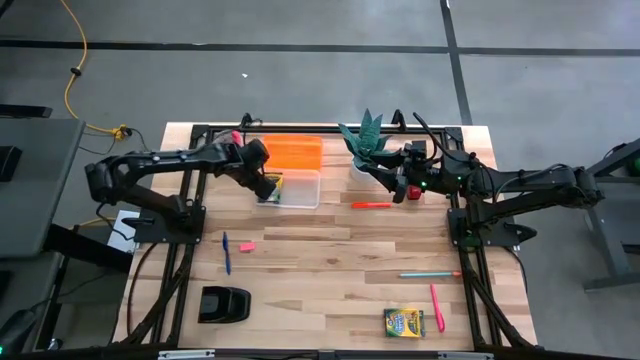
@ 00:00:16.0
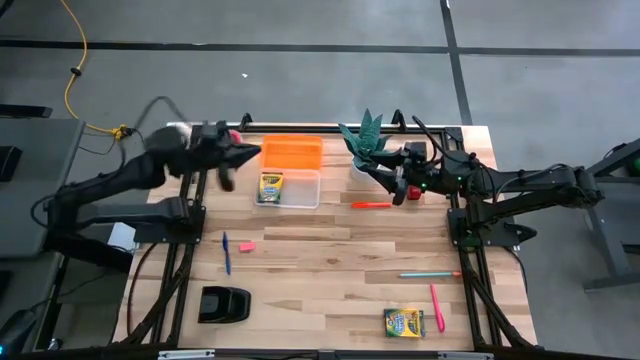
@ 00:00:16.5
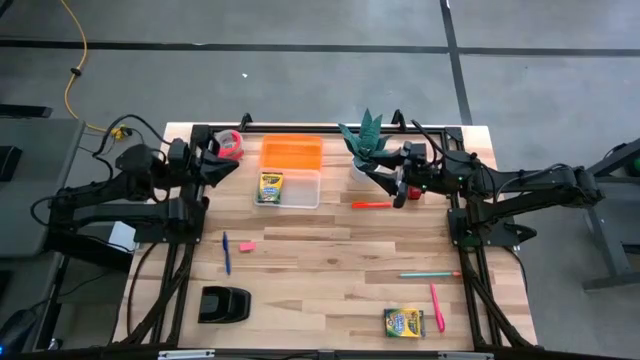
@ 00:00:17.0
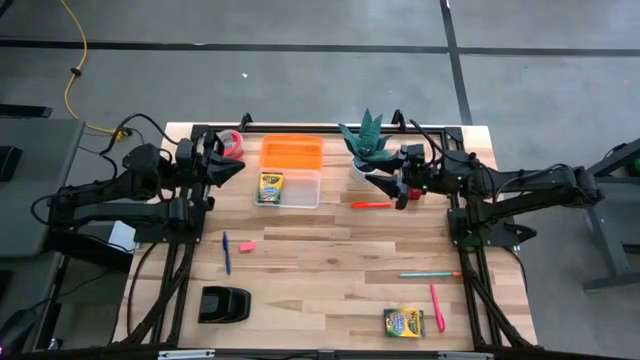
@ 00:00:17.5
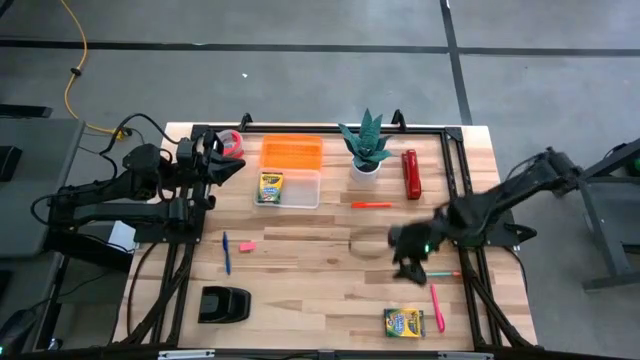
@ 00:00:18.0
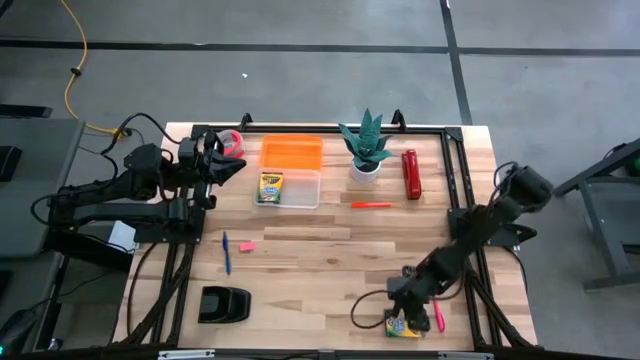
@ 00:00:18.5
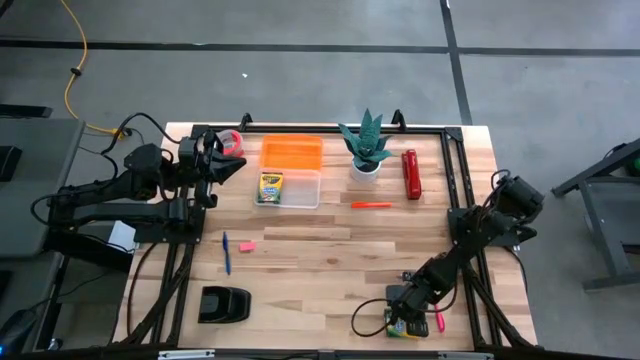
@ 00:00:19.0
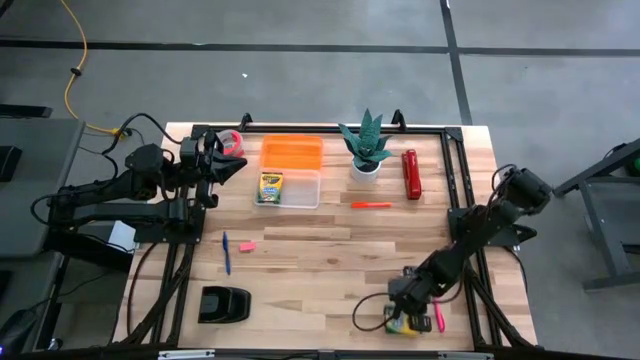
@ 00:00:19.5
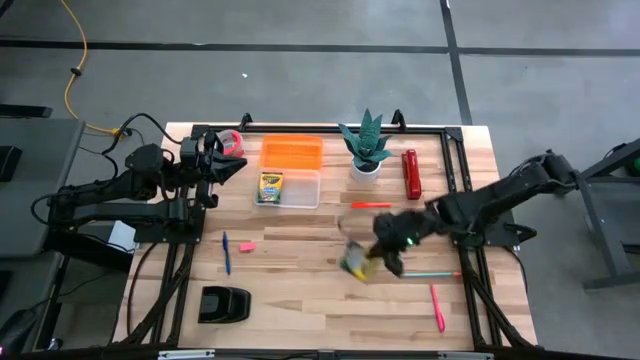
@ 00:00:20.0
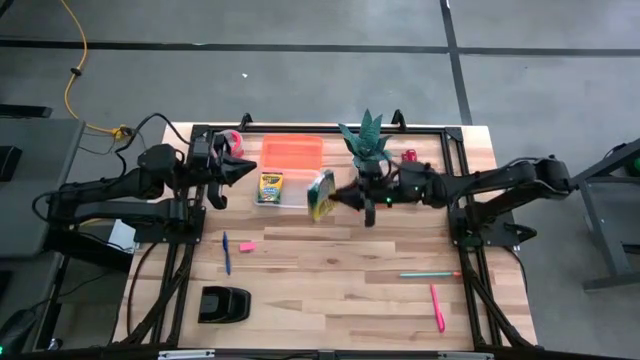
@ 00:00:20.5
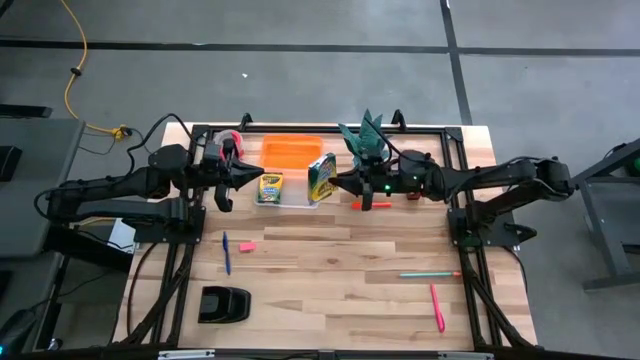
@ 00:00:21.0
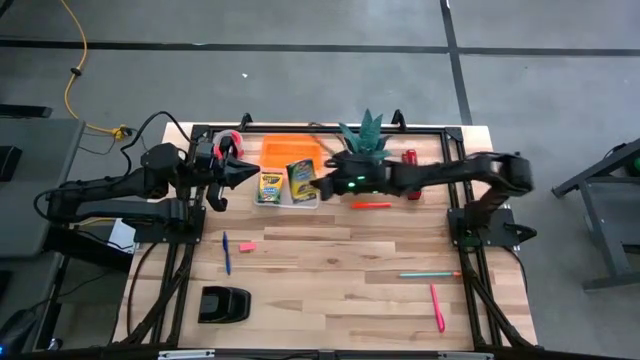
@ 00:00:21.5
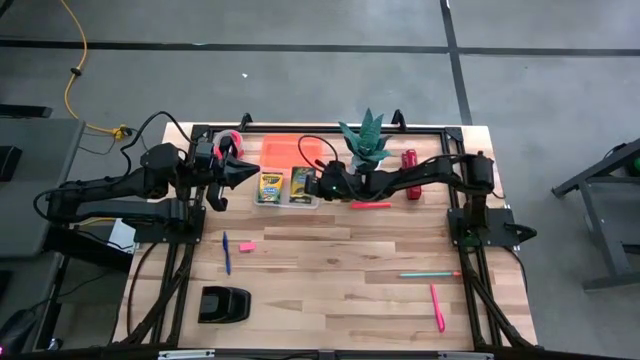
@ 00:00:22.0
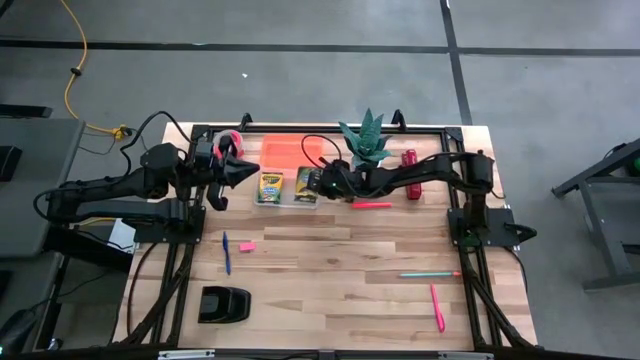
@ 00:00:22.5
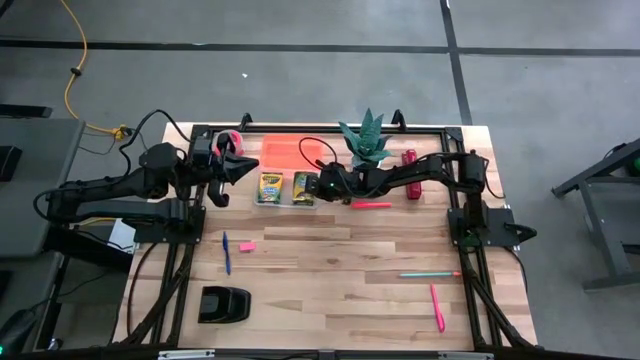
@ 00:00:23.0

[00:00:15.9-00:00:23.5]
Task: Pack school essentials
Put the yellow crayon box into the orange supply box

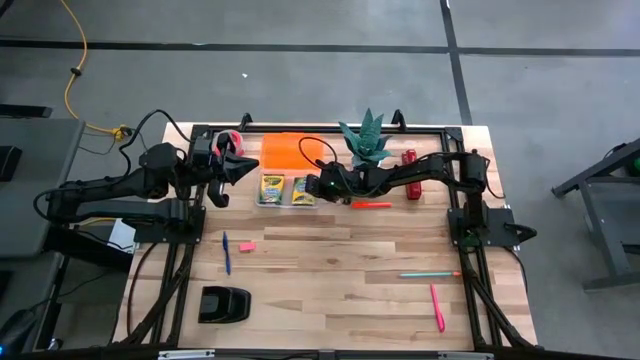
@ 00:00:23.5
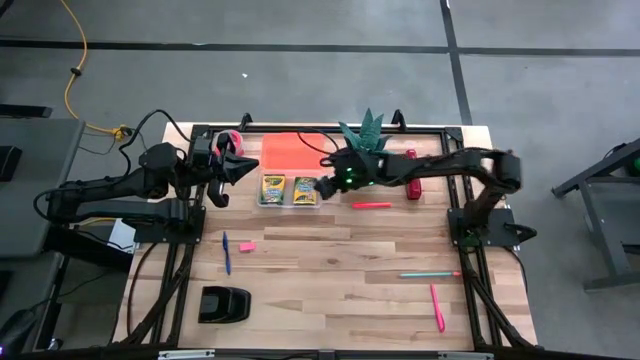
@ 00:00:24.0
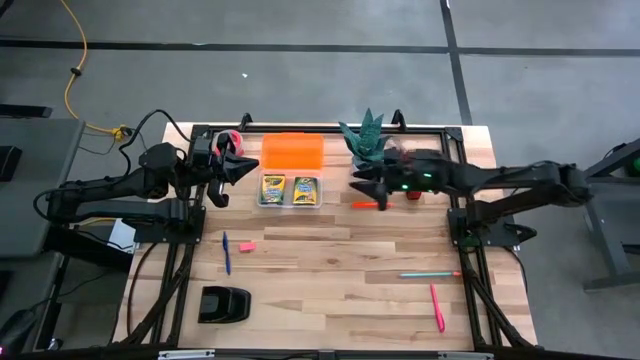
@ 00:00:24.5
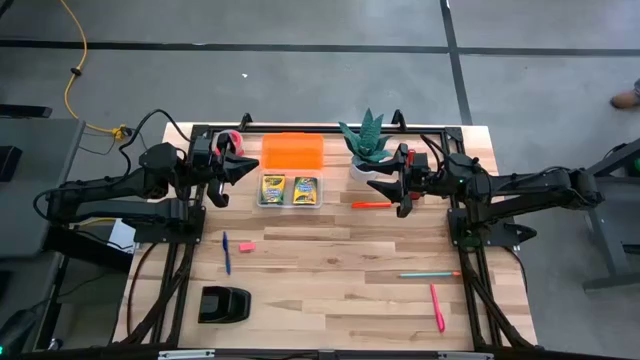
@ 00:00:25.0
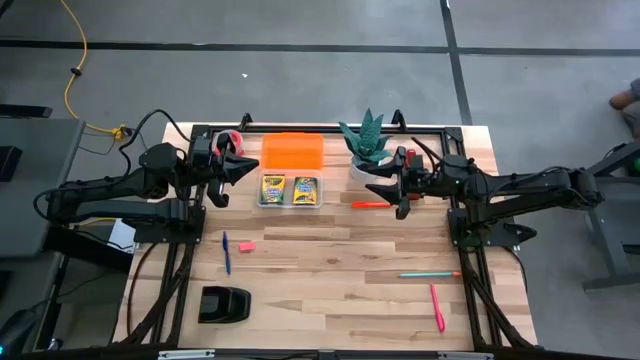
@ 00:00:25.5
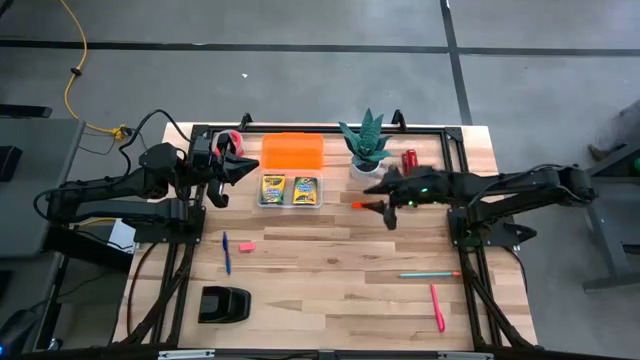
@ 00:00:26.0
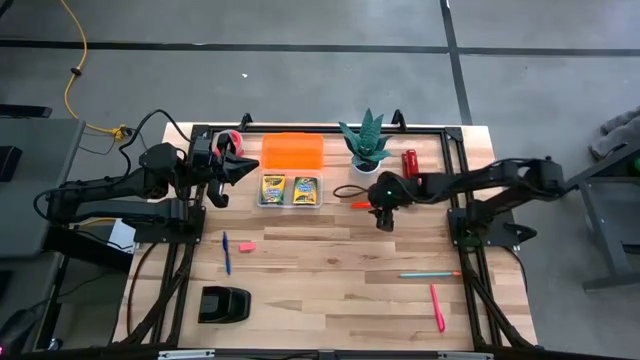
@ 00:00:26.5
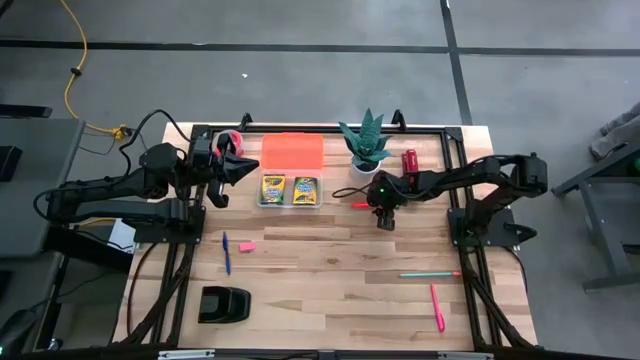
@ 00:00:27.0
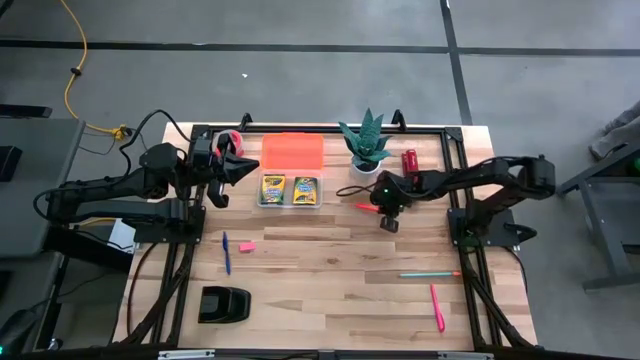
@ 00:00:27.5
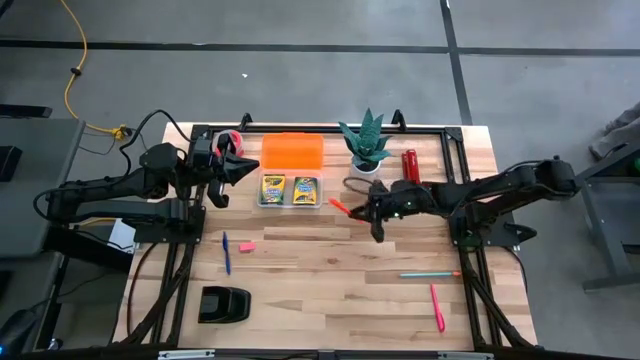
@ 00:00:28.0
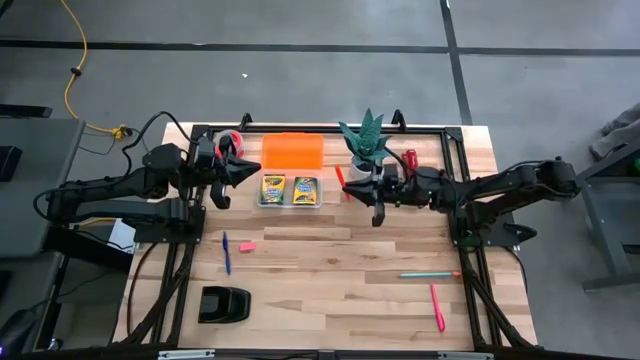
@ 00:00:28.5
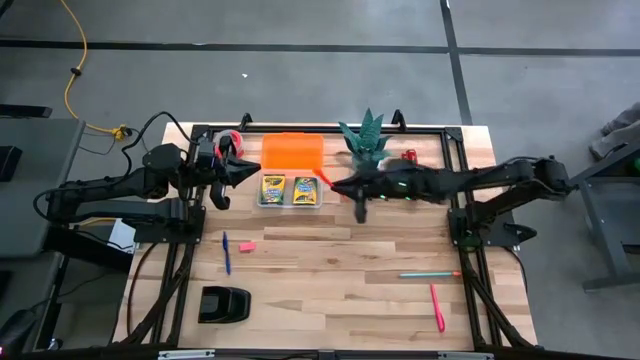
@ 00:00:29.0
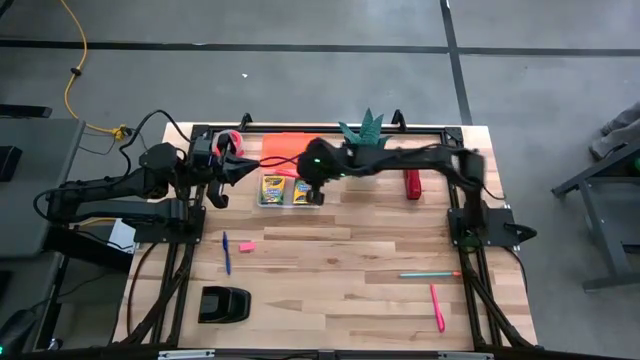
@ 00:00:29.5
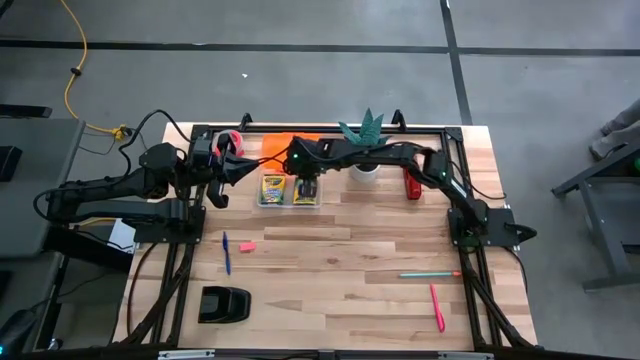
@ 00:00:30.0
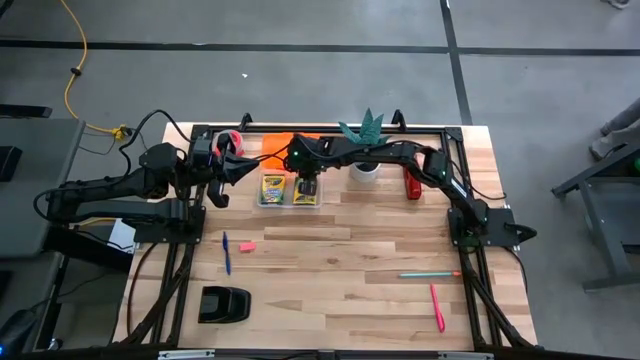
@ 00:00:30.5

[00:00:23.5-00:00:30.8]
Put the orange pen into the orange supply box
